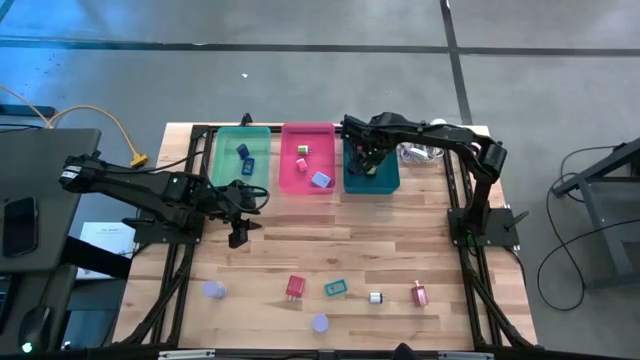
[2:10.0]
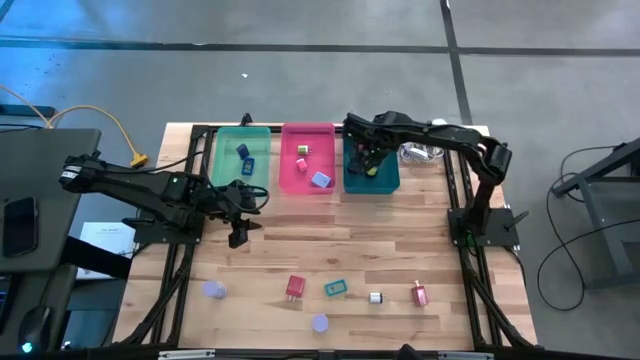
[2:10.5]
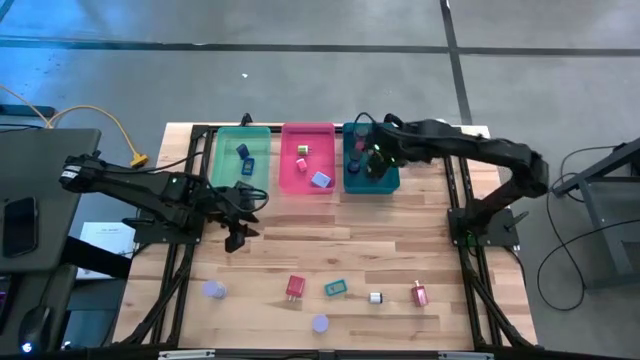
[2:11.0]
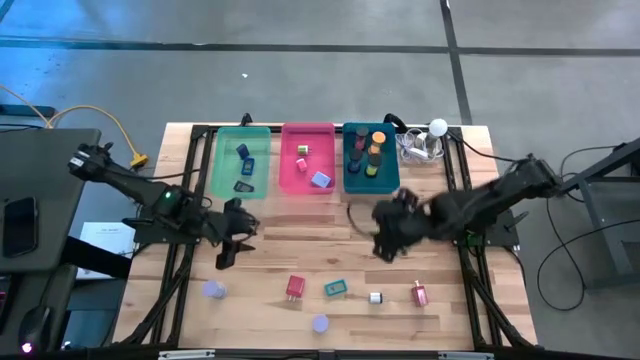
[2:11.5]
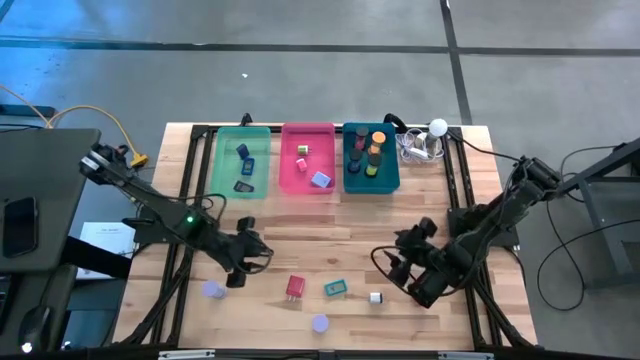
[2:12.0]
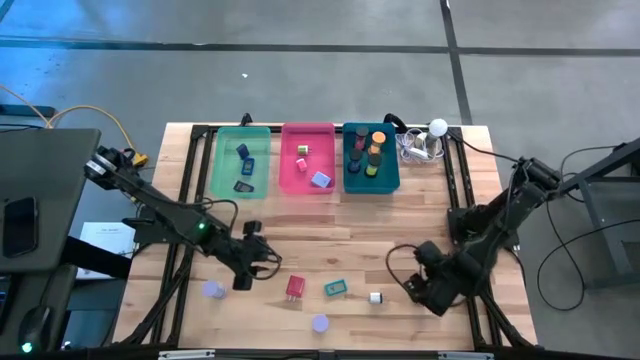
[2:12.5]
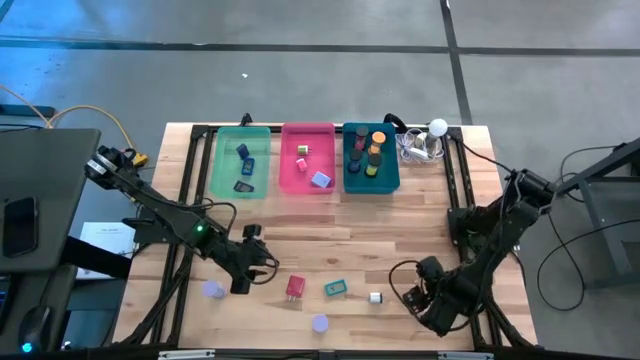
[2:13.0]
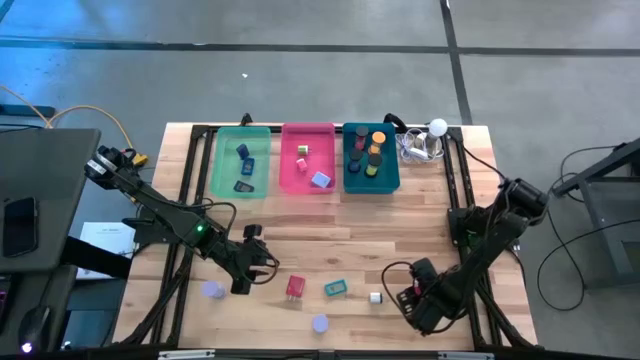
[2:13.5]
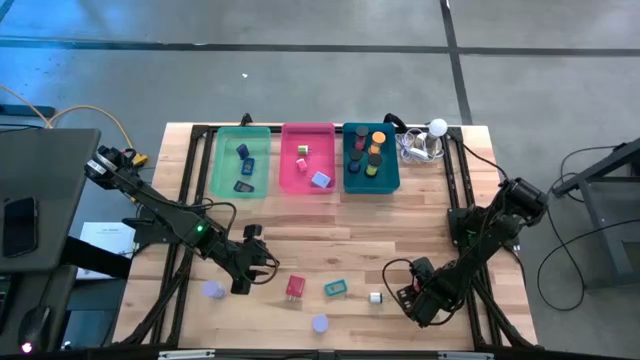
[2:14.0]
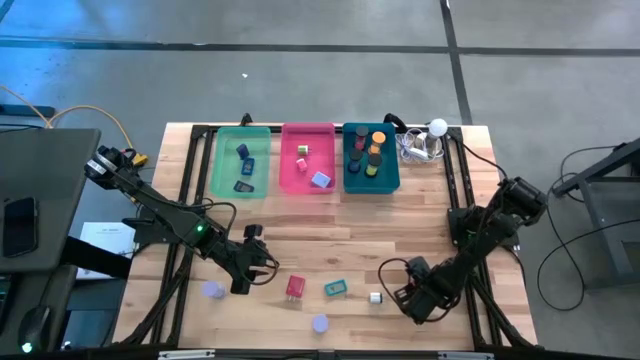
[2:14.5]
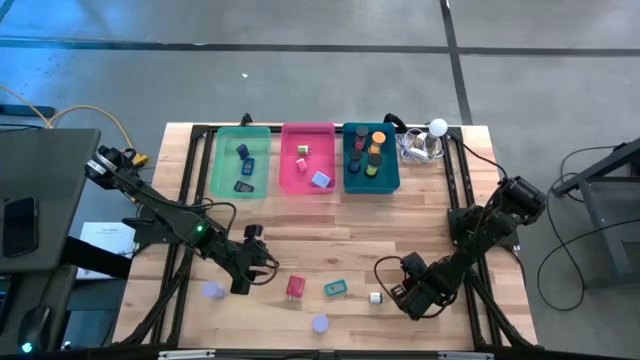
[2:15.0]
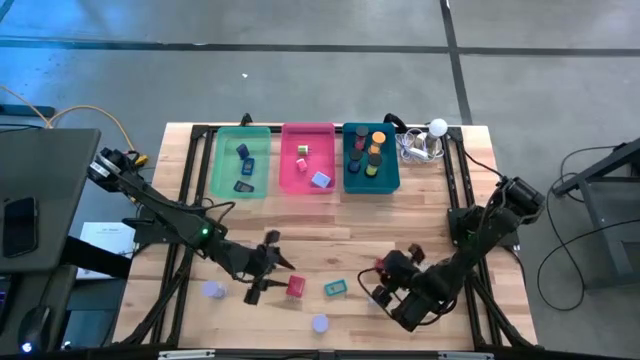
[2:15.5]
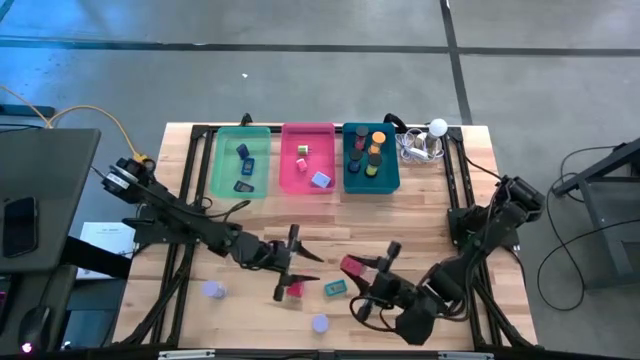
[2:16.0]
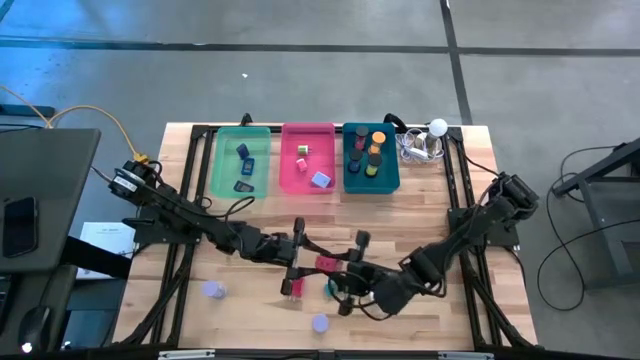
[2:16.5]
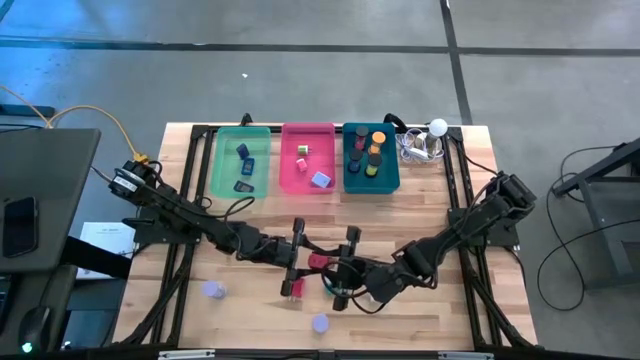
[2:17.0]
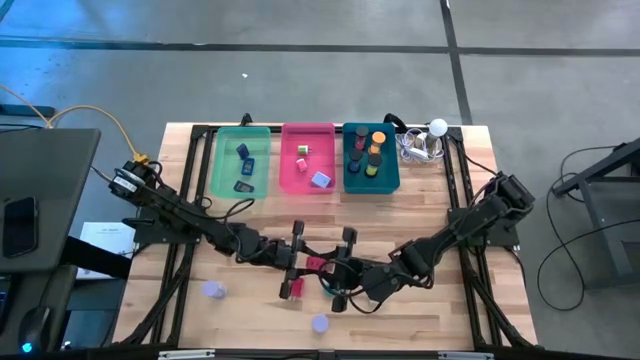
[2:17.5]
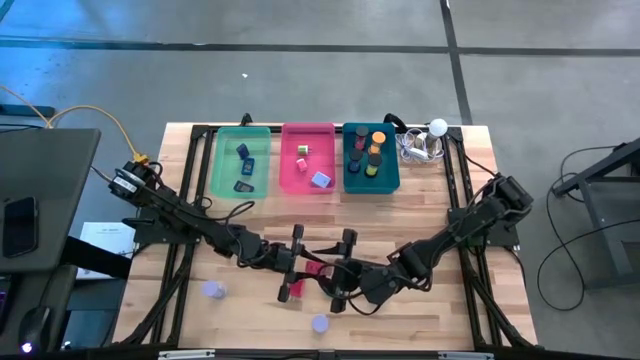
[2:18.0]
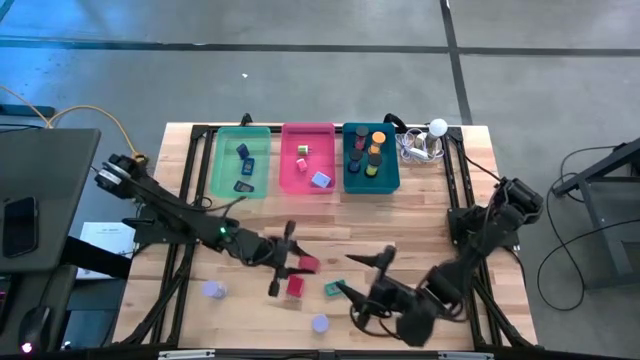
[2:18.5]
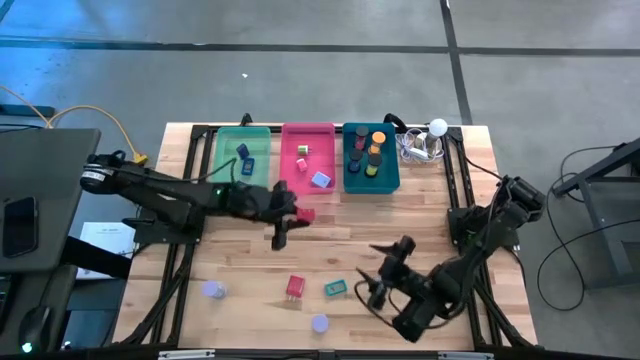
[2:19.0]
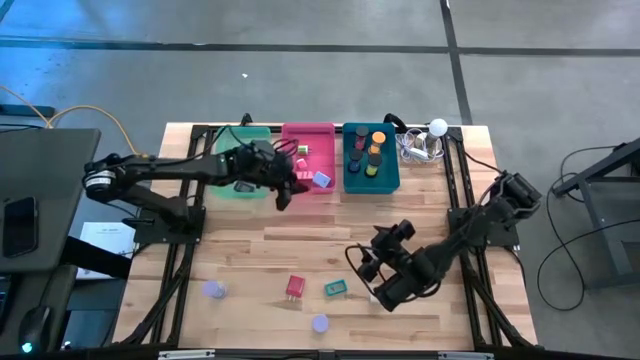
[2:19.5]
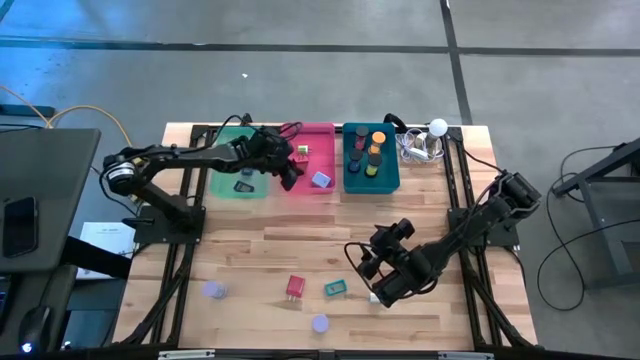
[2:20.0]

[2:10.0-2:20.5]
Task: Pick & Place Office items
Put the right red charger adapter into the red bin

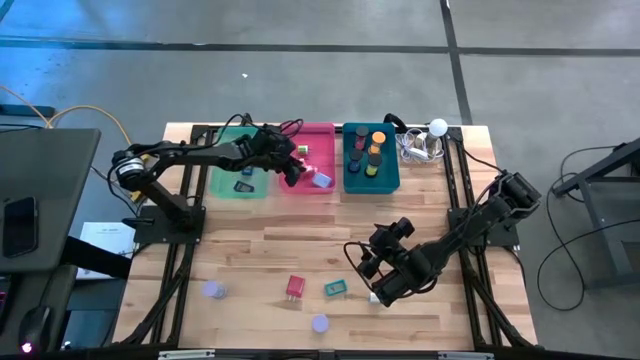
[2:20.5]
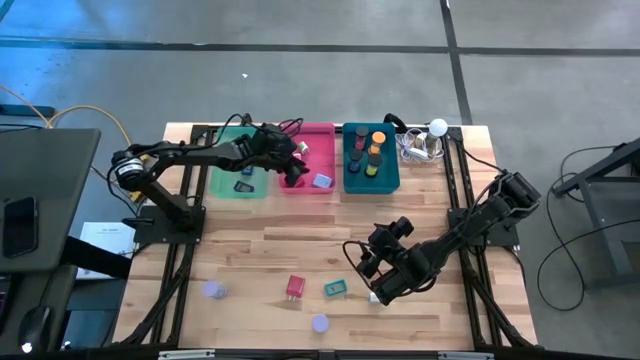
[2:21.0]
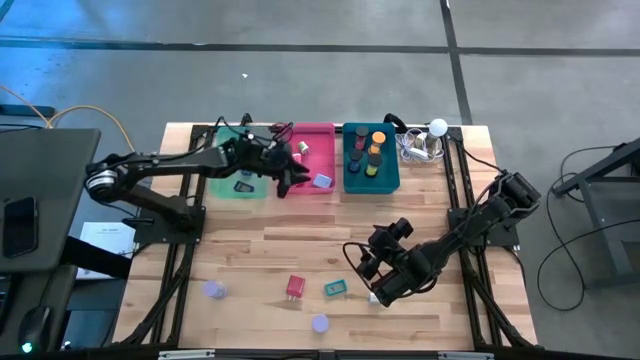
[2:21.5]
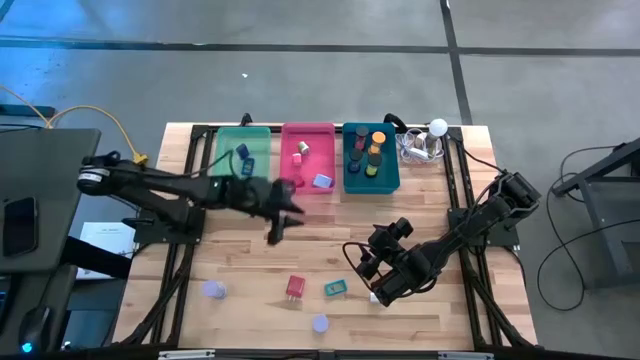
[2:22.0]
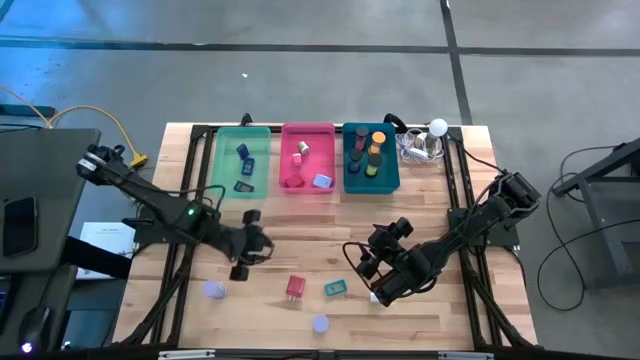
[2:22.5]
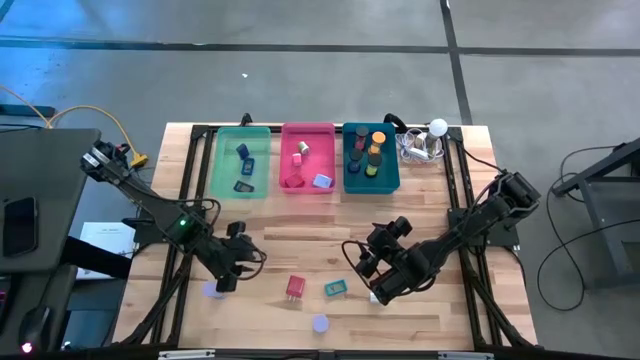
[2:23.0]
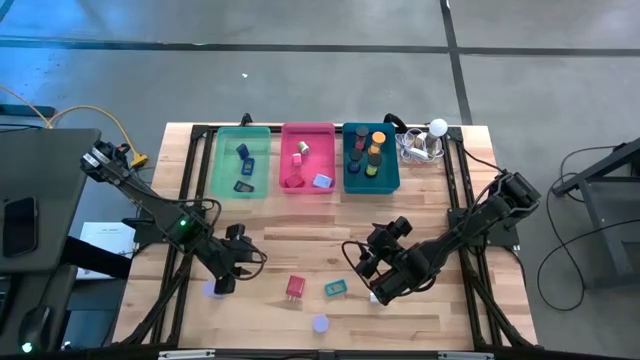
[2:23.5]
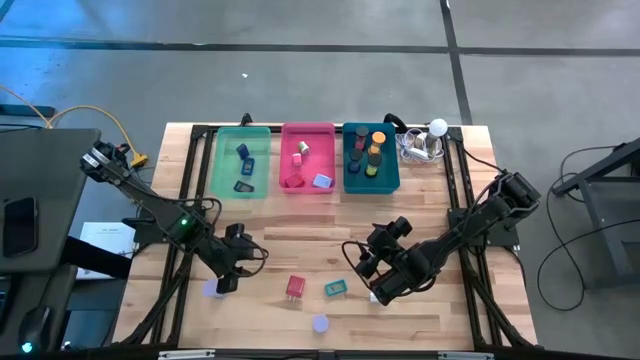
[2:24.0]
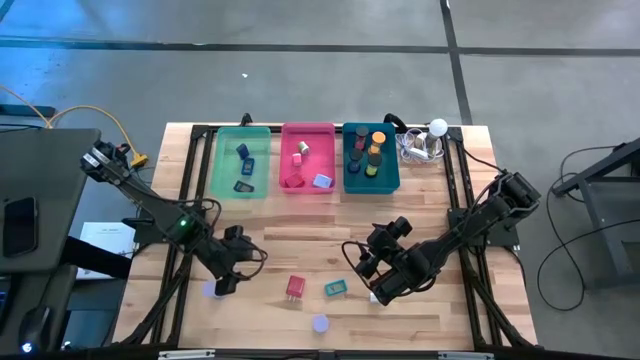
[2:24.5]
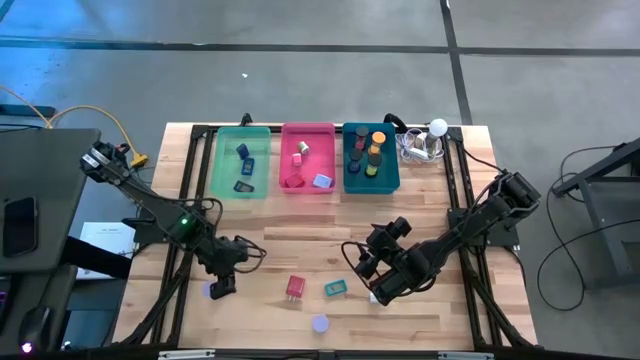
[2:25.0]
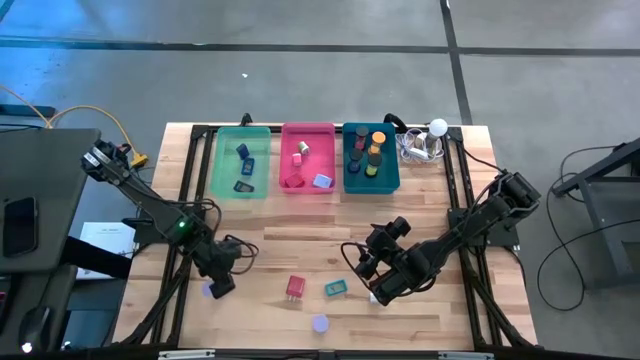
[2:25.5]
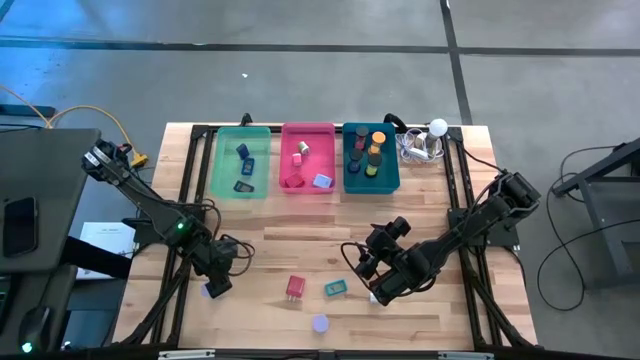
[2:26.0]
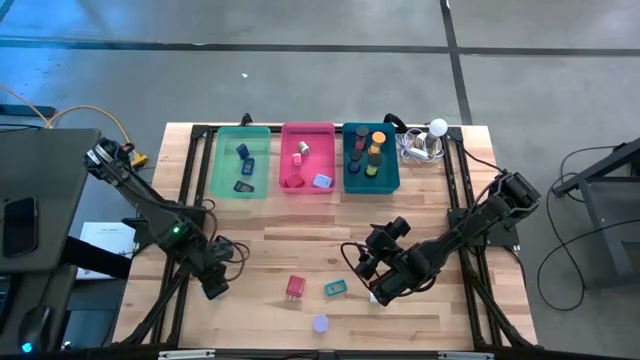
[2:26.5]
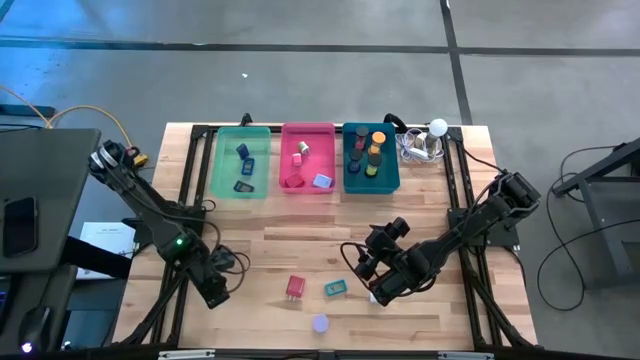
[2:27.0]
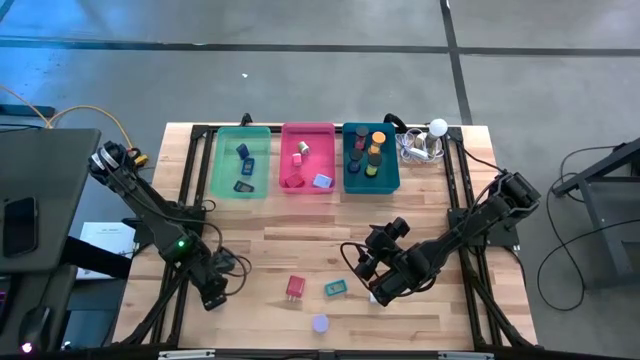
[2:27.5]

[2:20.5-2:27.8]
Put the top purple hourglass into the blue bin

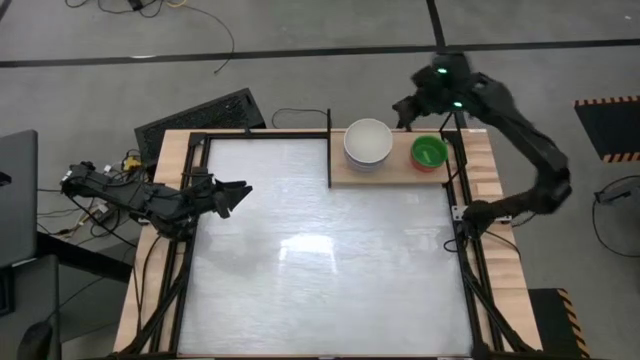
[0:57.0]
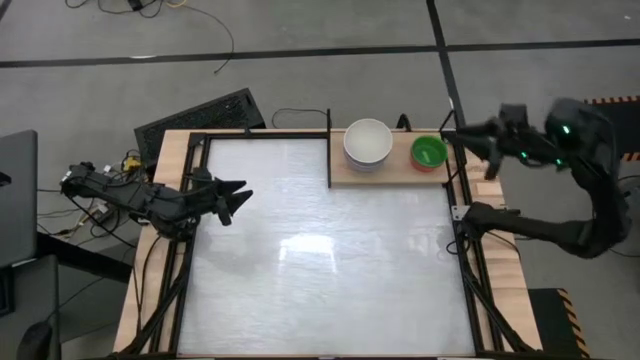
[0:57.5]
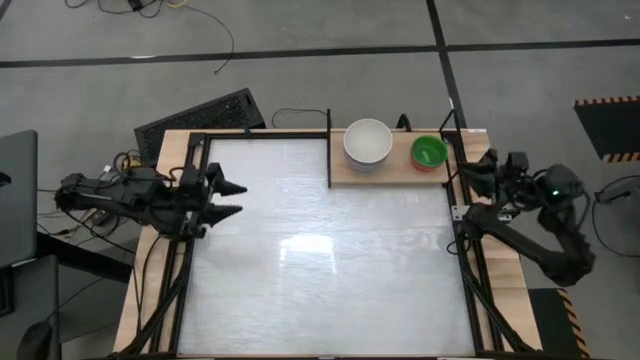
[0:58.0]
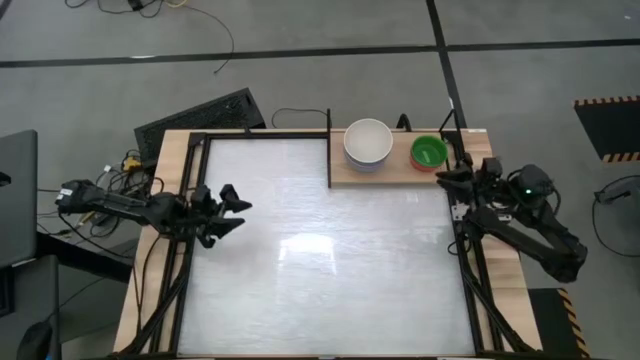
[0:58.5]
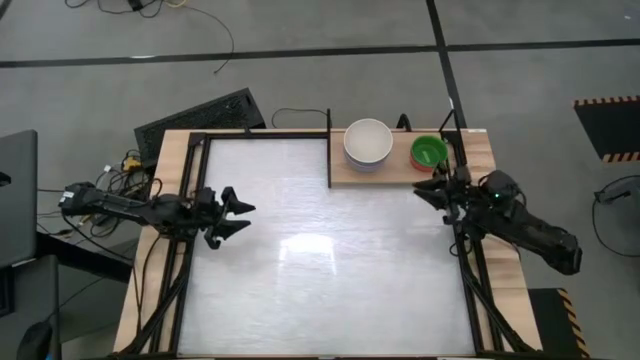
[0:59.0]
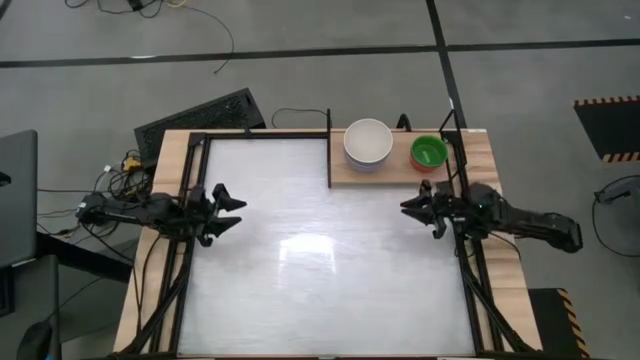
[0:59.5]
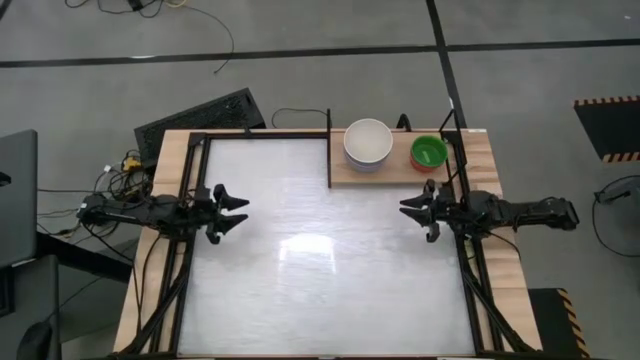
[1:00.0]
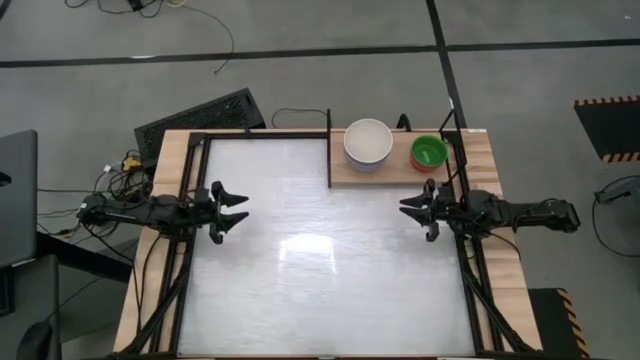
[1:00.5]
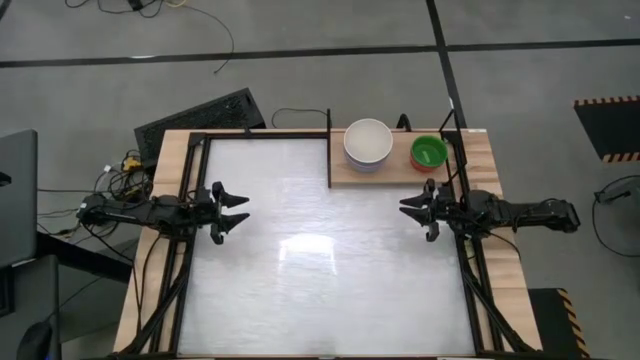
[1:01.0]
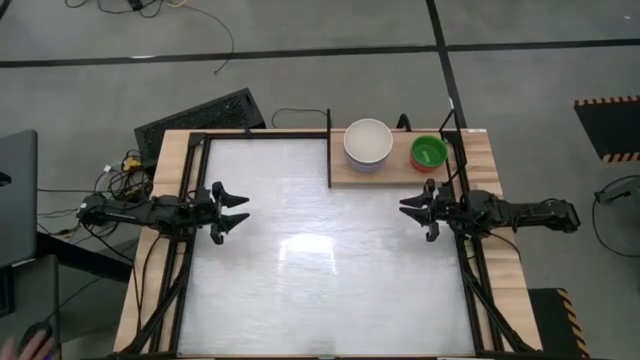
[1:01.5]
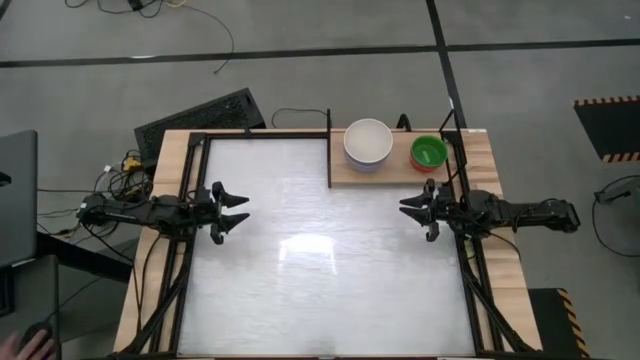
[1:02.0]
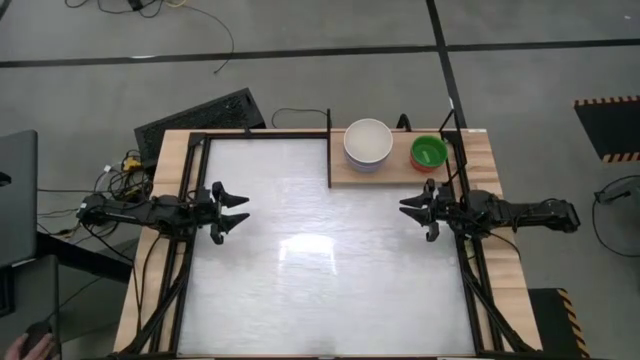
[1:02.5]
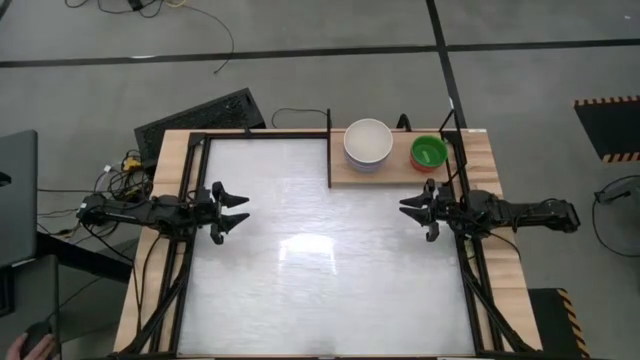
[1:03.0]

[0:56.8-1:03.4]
Task: Place and stack bowls onto a shelf
Return to Home Position
